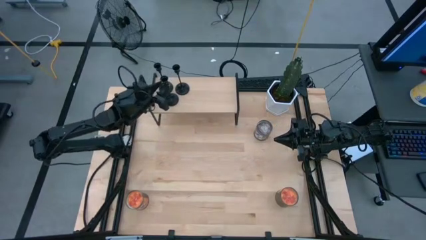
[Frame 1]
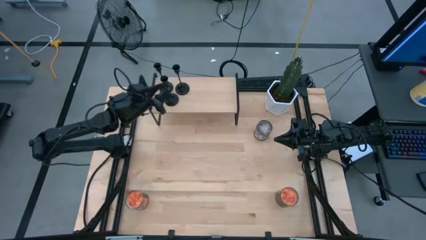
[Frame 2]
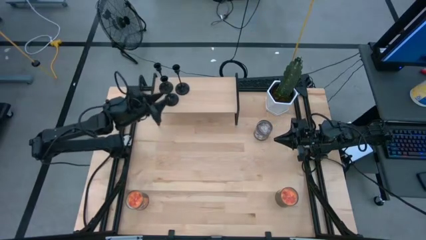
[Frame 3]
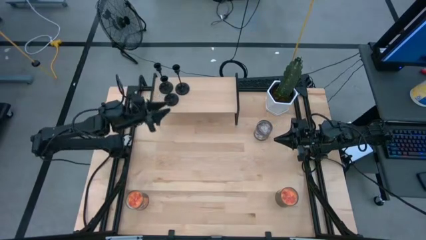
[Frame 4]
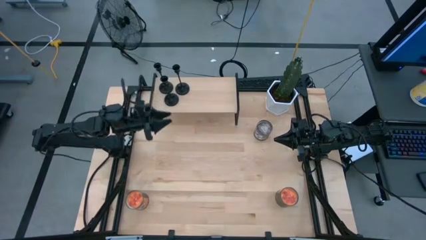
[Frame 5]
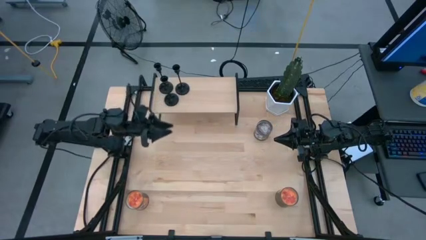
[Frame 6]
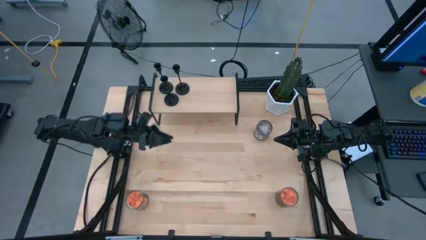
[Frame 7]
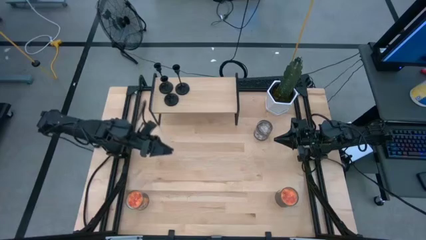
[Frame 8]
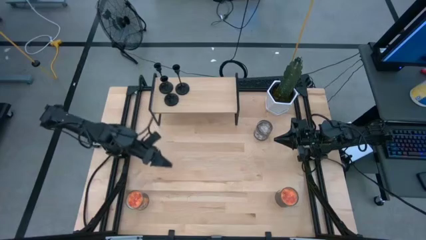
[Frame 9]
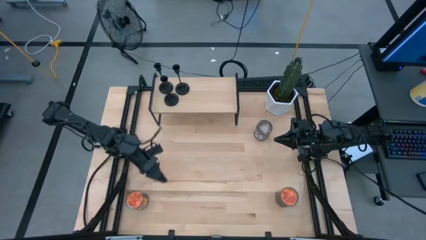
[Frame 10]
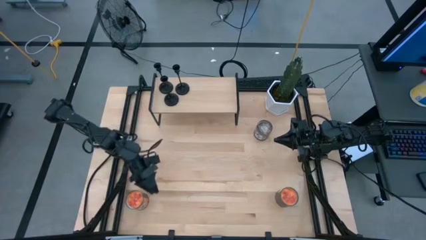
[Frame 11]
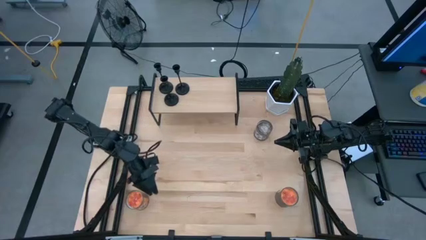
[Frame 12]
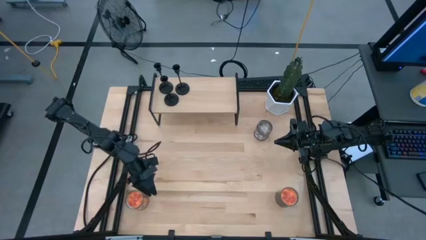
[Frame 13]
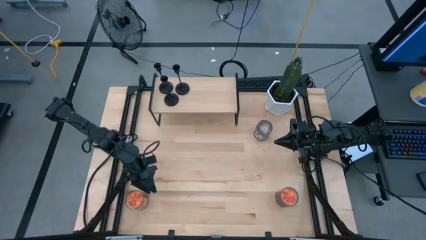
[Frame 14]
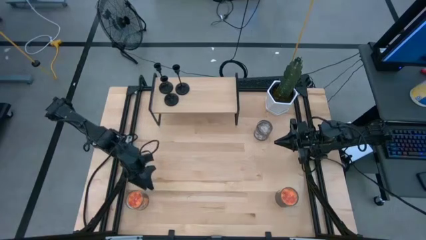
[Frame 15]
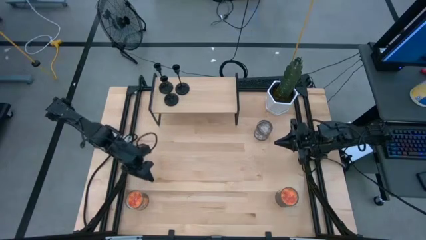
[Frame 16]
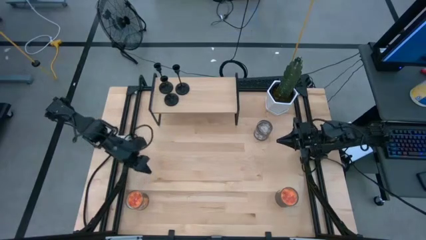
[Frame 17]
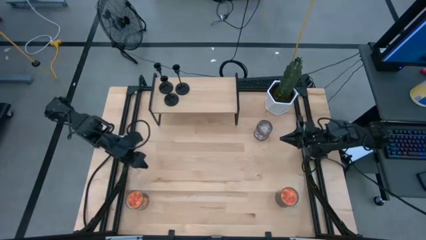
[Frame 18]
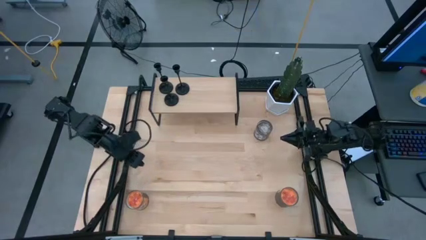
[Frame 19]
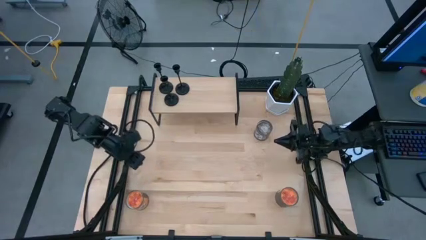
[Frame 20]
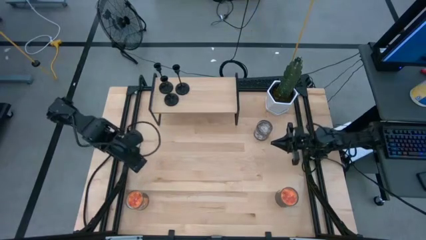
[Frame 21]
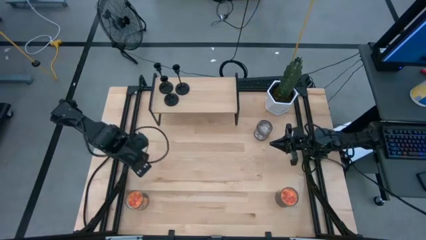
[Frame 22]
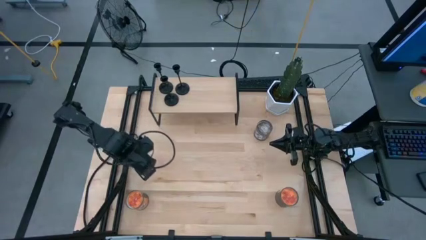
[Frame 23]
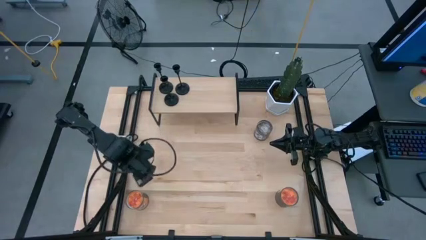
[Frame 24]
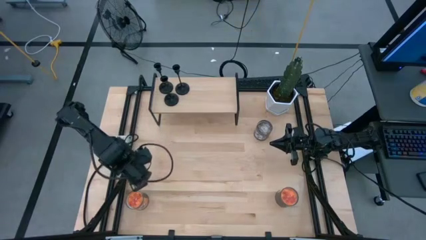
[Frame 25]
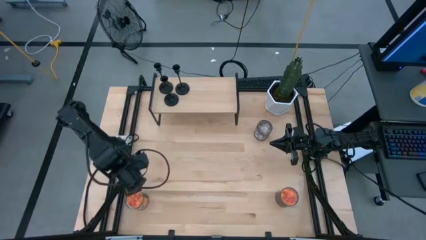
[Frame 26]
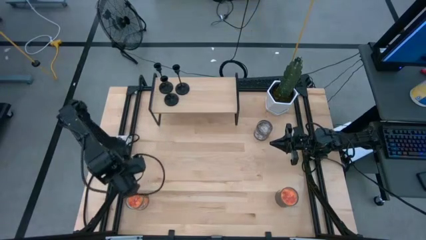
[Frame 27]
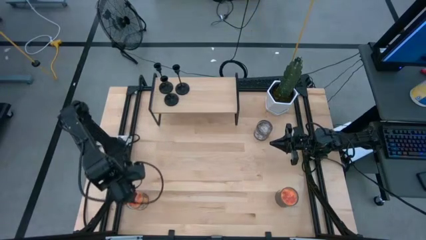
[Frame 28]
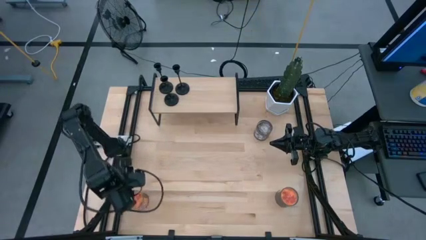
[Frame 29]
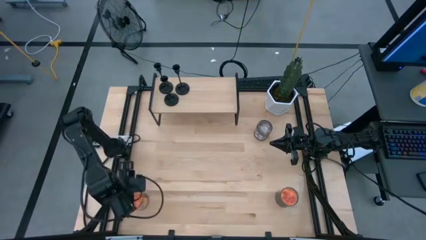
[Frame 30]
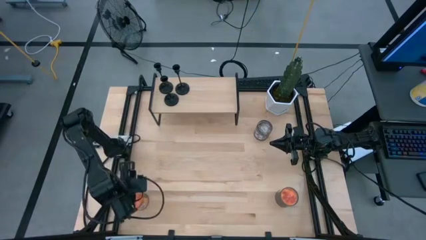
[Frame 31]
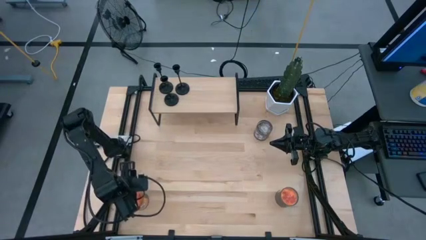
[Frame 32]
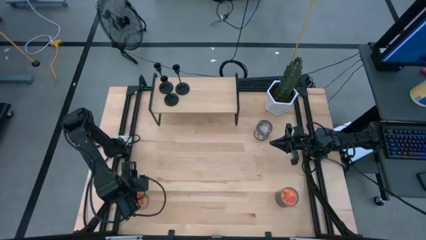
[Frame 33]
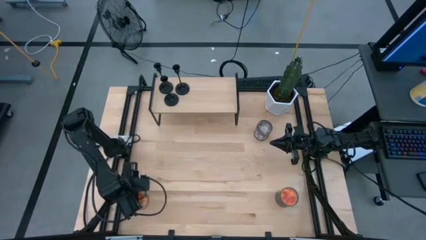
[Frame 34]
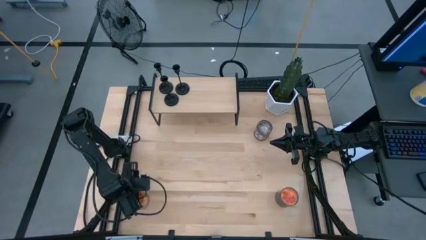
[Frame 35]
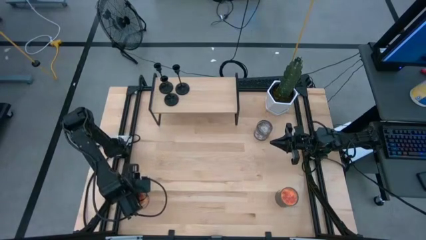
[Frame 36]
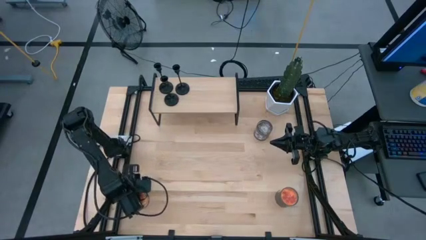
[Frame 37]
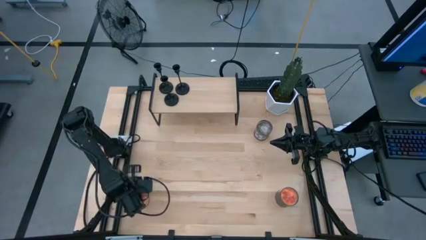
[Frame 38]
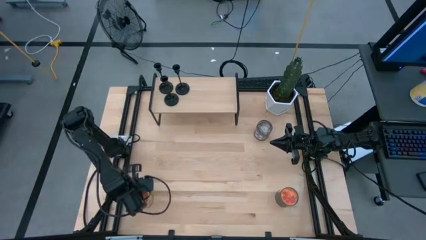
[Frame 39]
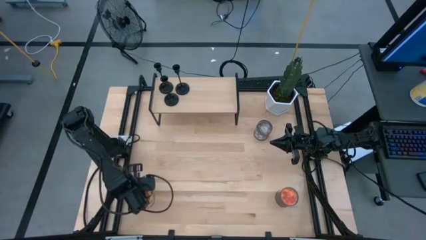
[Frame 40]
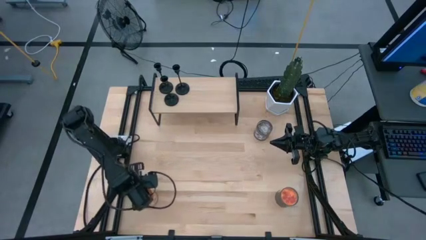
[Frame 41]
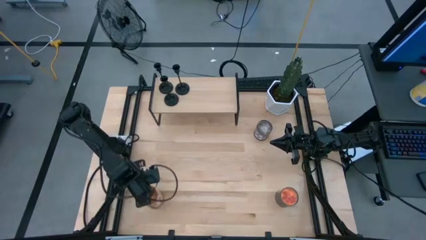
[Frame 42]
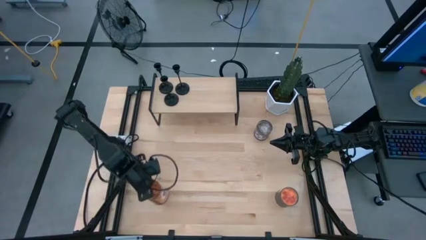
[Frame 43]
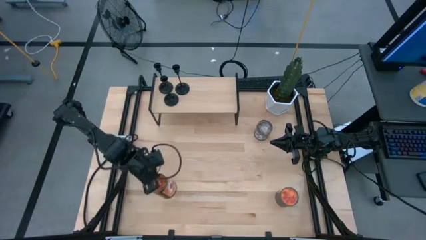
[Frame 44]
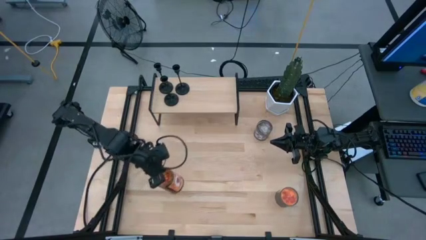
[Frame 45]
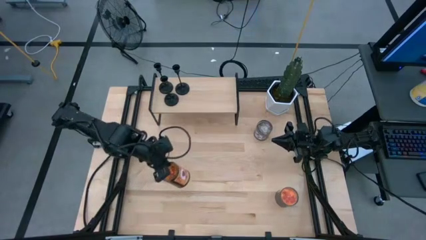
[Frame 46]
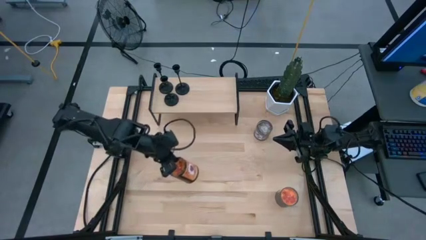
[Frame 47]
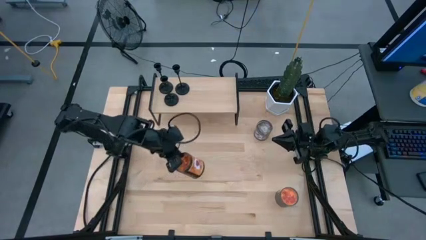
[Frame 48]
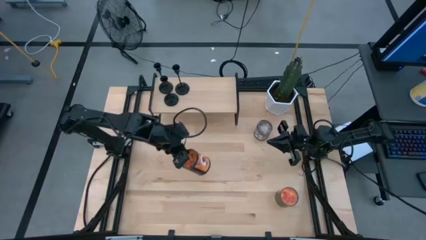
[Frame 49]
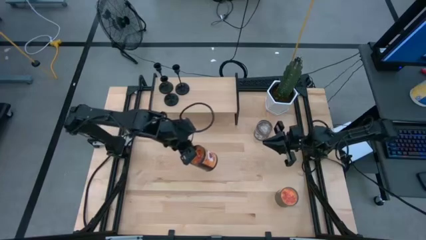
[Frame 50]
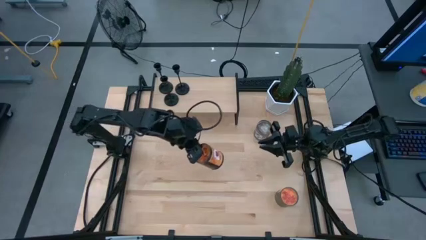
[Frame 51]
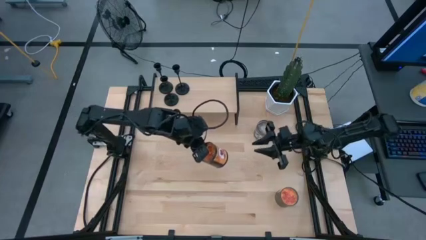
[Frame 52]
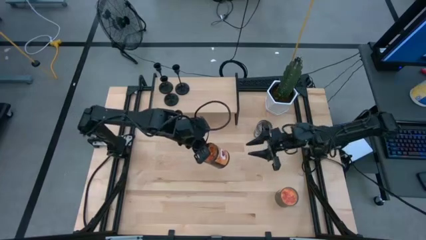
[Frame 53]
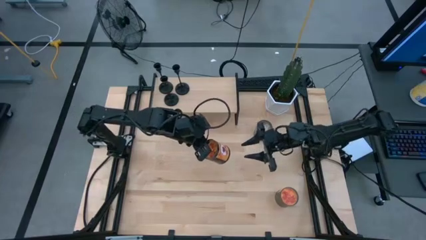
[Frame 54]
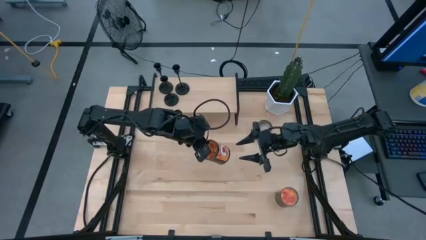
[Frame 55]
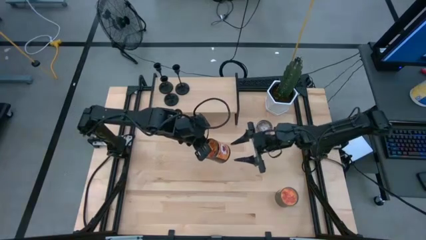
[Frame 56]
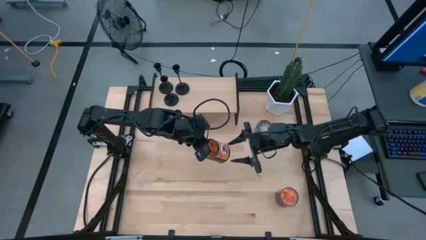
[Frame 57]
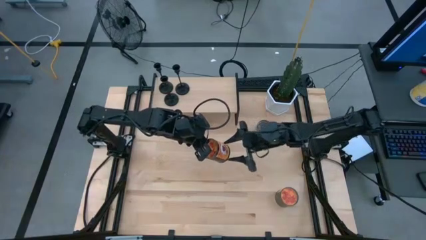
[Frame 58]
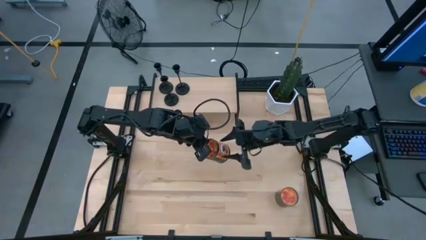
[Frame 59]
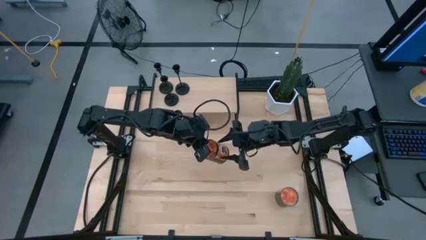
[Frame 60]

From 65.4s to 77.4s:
Task: Pick & Place candle stick holders
Put the left orange scented candle on the shelf

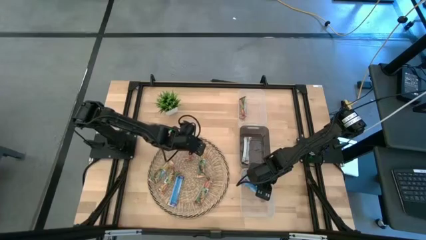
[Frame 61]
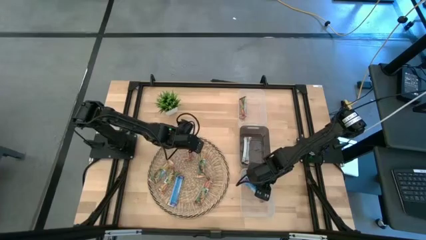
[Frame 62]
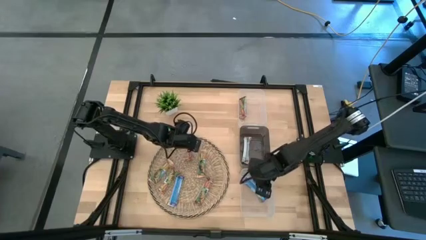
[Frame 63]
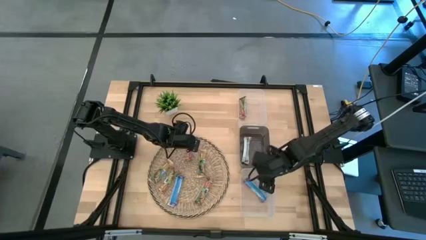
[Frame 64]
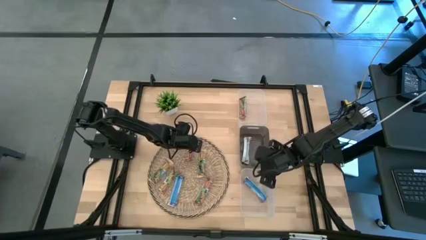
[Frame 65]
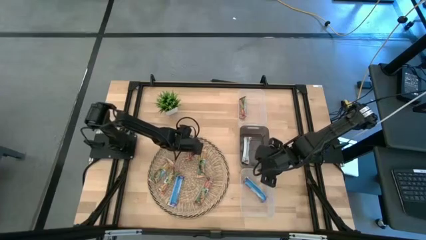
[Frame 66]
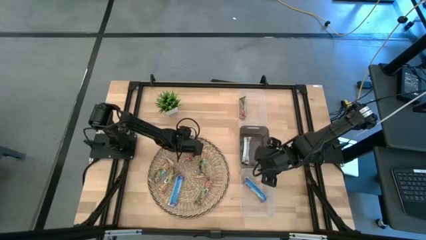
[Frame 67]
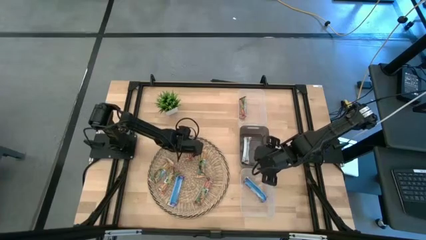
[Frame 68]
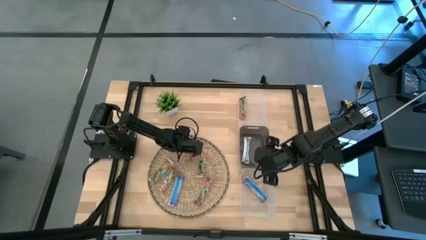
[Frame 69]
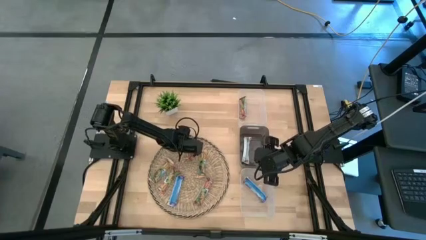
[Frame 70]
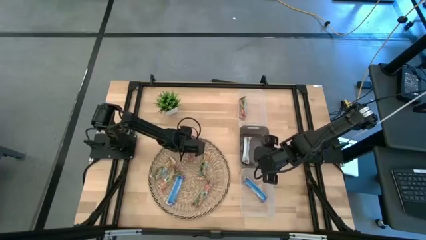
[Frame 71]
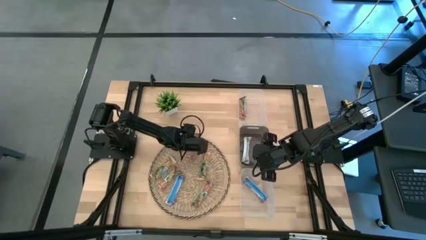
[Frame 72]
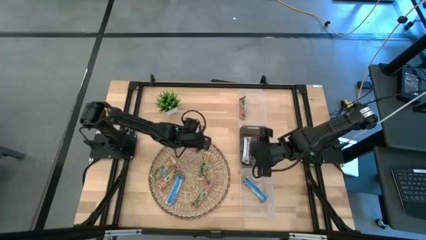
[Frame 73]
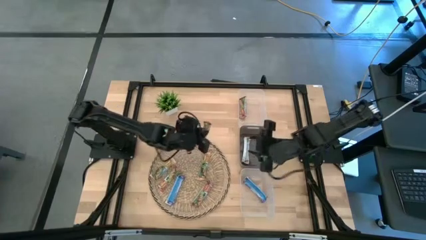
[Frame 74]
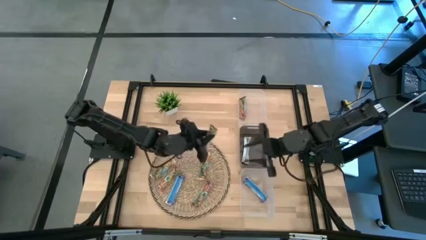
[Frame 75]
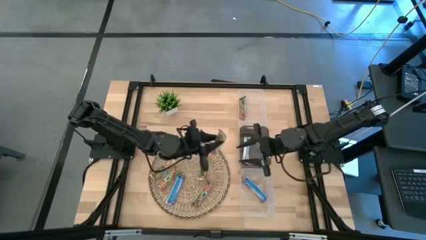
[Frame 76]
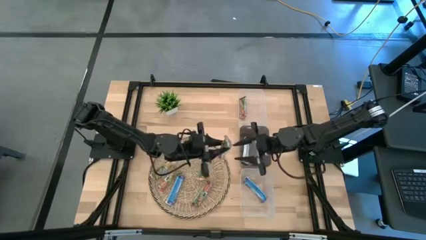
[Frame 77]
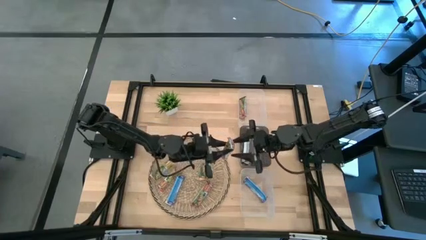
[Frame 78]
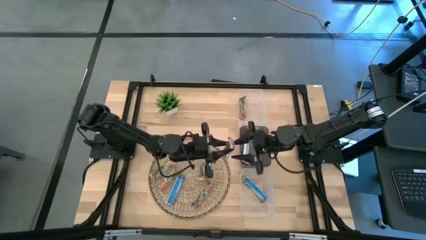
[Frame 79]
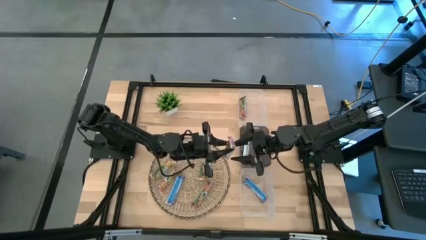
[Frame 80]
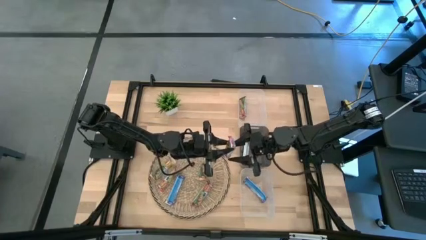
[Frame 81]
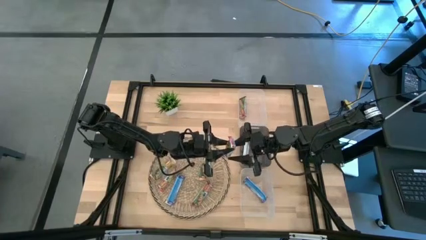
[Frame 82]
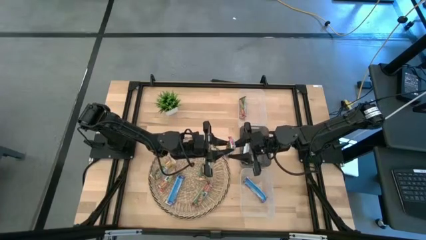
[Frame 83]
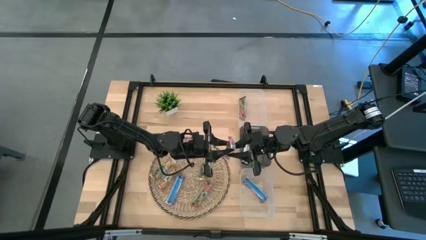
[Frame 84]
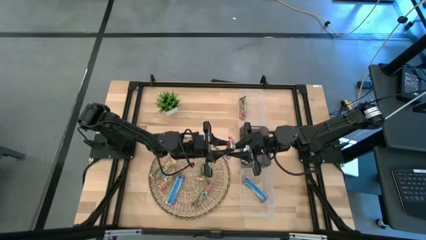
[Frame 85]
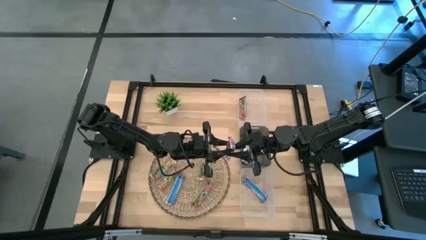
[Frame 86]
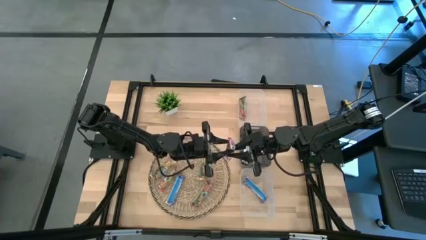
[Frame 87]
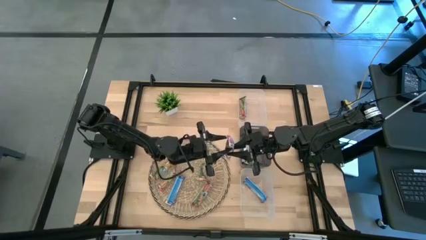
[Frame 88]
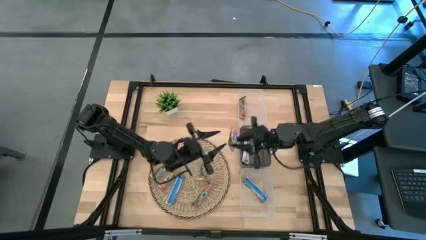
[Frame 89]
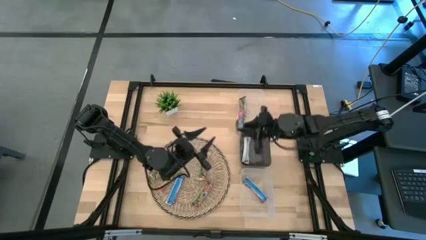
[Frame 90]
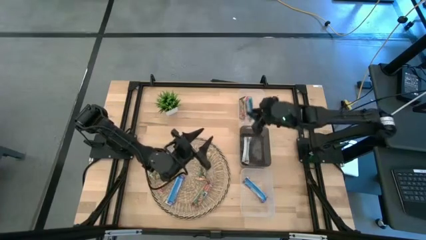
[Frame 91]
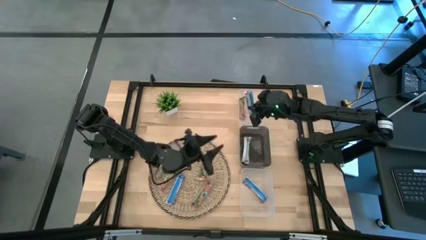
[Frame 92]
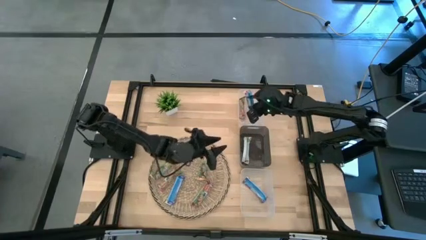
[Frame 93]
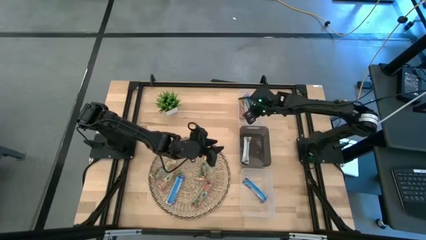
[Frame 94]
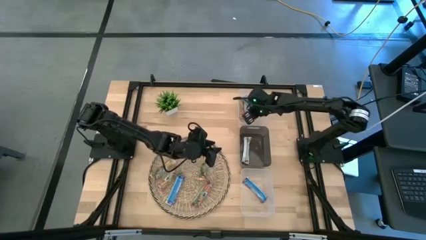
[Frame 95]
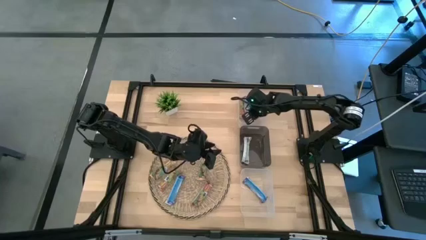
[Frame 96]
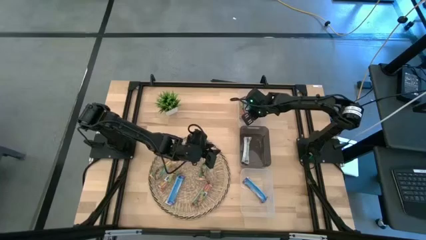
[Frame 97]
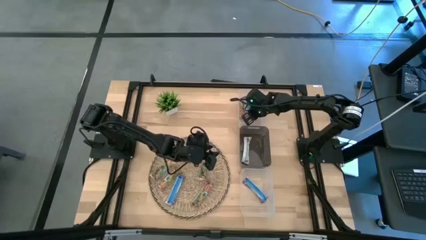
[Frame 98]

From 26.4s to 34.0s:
Task: Pick and place Granola Bars by type
Put the red granola bar into the top transparent bin
